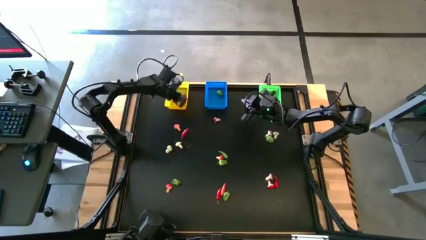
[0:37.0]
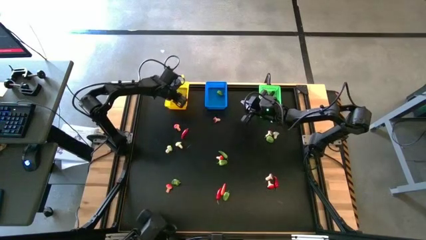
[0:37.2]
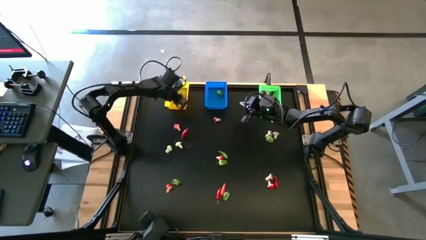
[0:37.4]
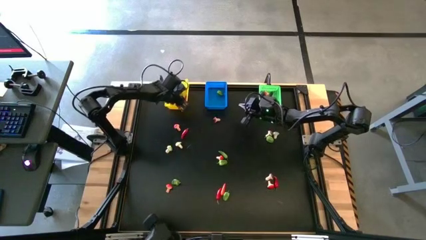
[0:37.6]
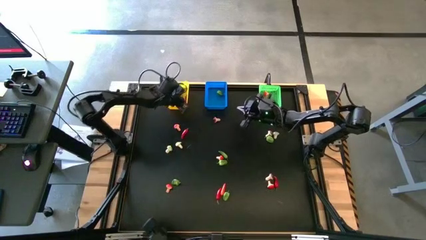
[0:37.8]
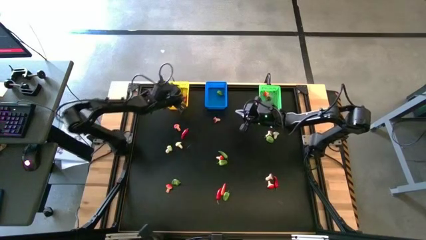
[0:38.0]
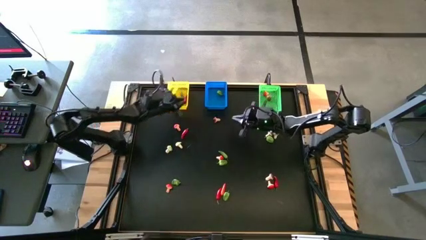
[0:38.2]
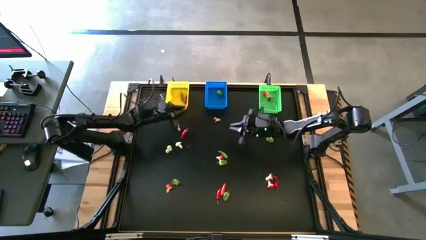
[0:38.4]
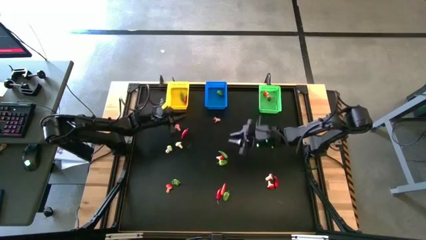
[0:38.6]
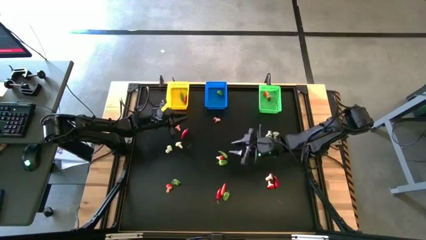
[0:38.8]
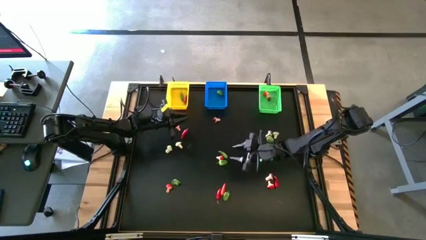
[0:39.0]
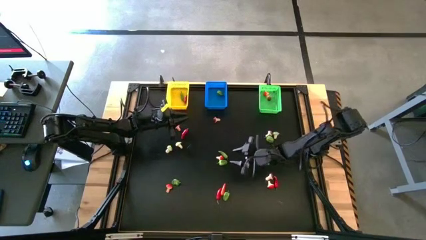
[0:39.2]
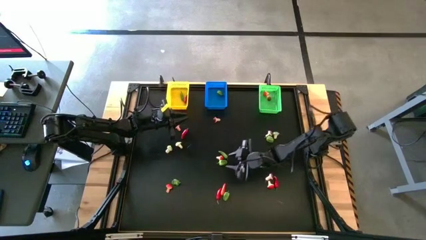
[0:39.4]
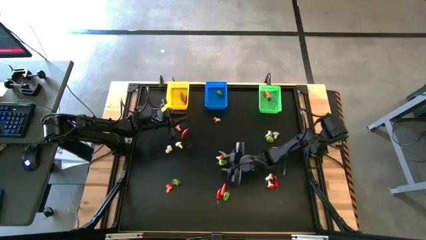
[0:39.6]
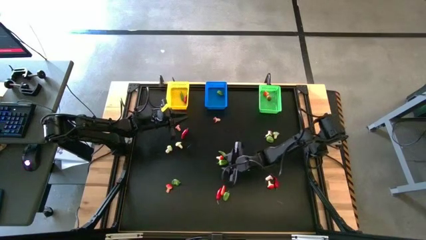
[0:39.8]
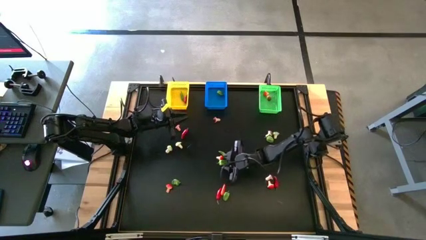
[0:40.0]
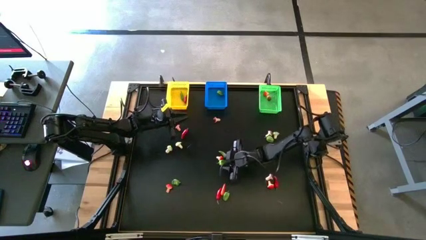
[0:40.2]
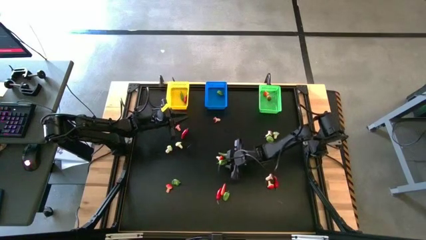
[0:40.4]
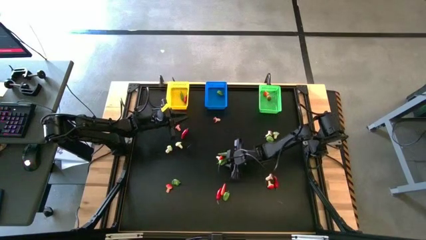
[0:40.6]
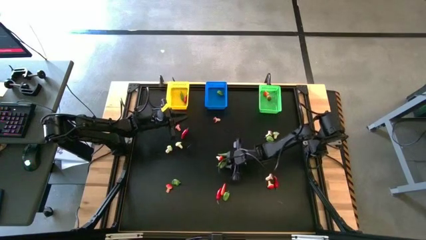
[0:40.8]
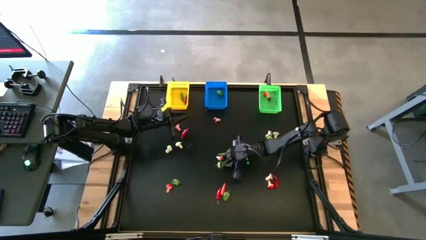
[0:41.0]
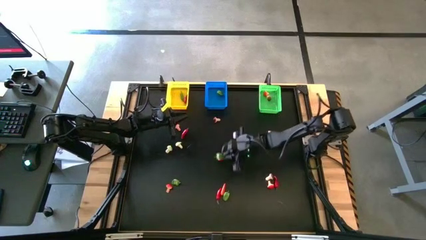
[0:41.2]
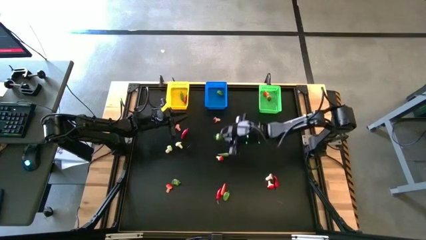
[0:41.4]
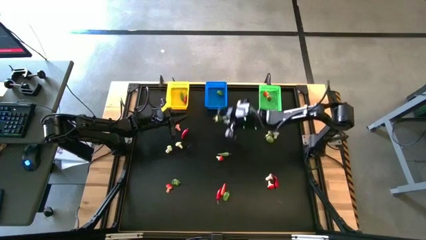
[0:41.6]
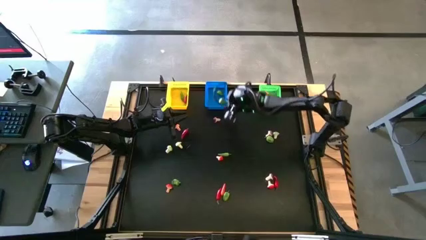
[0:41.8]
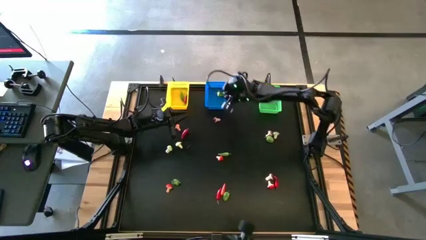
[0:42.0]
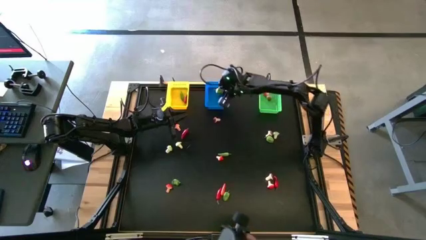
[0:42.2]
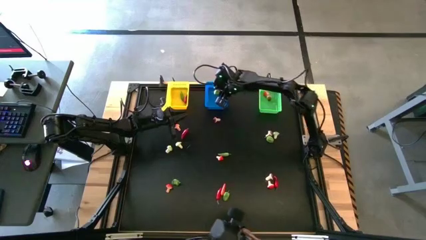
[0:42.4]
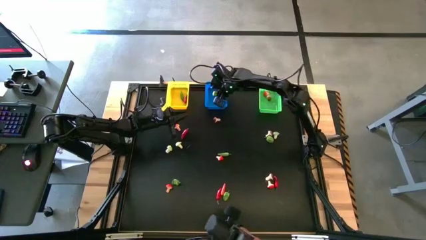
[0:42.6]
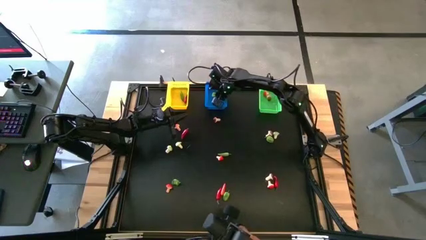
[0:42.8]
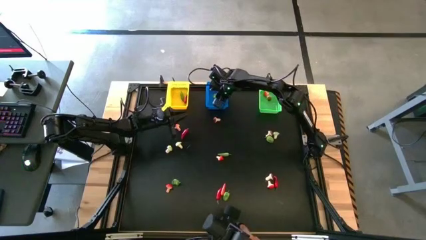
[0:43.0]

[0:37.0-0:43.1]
Task: Sort produce into baskets
Put the green chili pepper into the blue bin

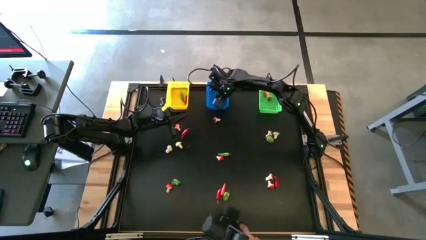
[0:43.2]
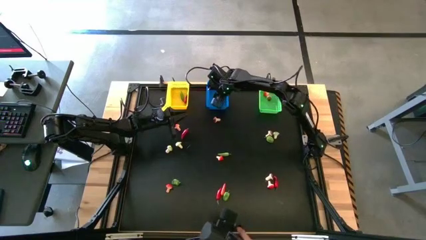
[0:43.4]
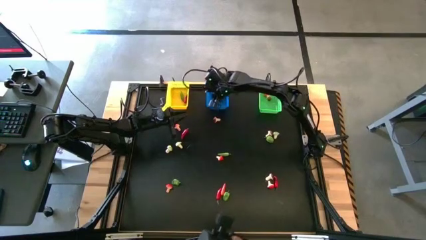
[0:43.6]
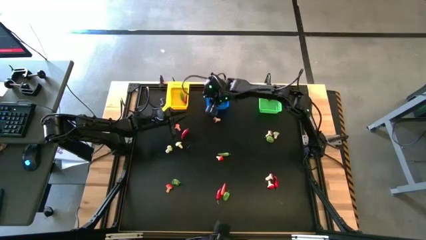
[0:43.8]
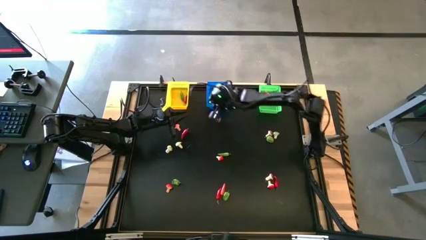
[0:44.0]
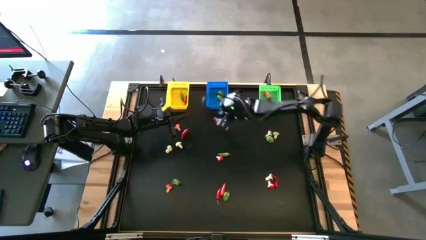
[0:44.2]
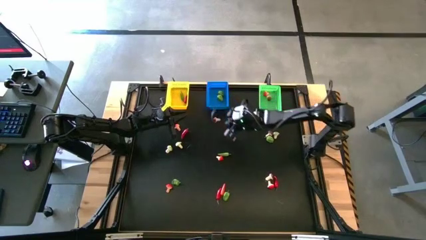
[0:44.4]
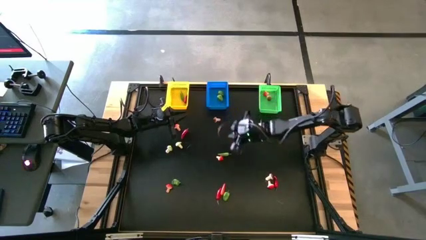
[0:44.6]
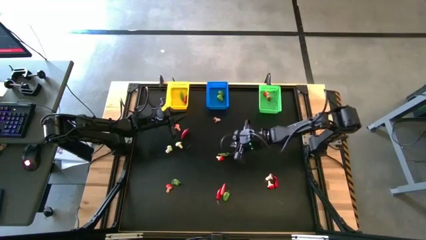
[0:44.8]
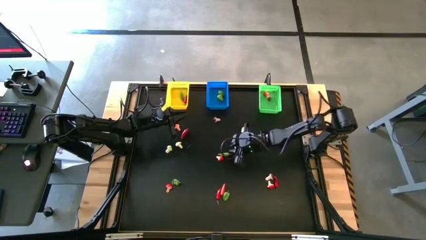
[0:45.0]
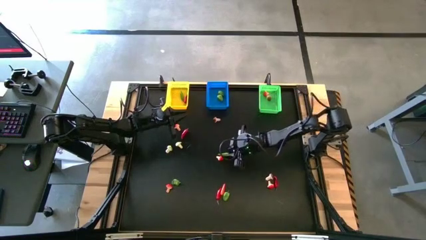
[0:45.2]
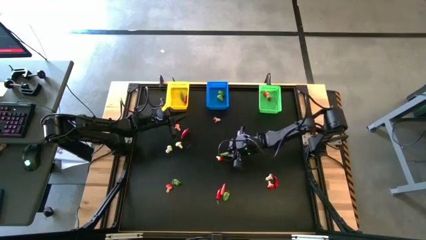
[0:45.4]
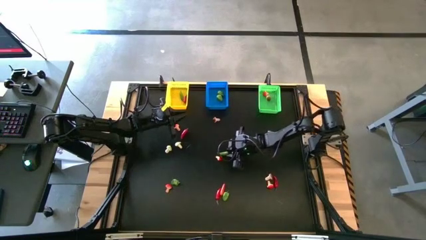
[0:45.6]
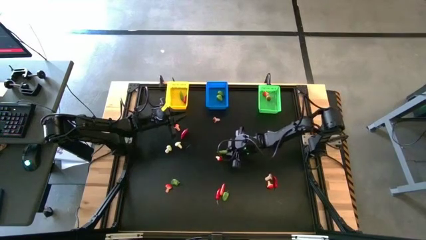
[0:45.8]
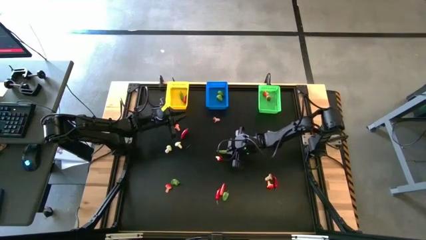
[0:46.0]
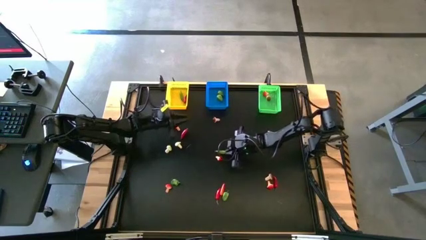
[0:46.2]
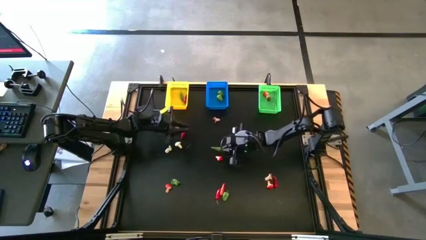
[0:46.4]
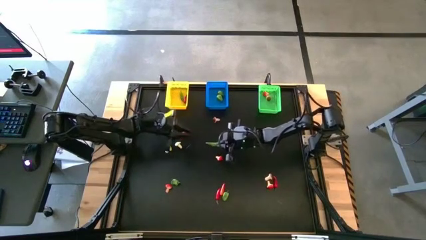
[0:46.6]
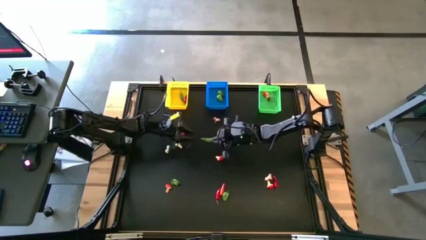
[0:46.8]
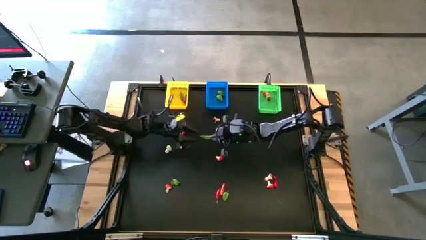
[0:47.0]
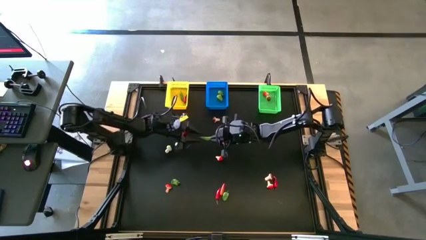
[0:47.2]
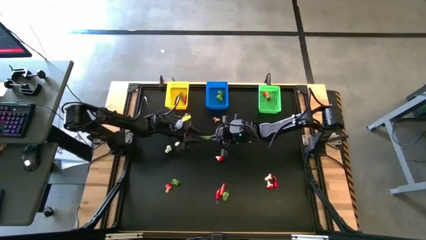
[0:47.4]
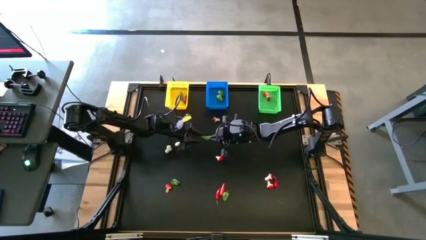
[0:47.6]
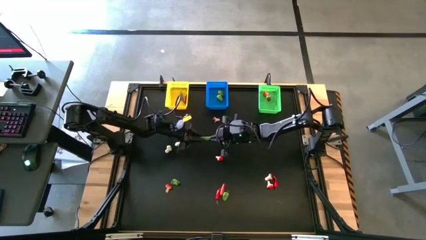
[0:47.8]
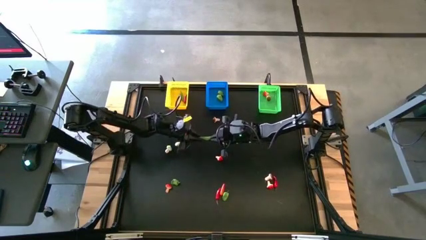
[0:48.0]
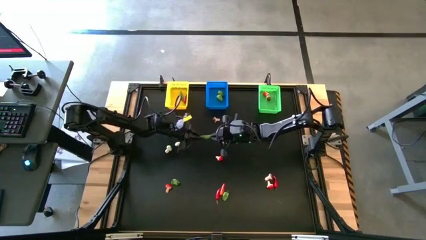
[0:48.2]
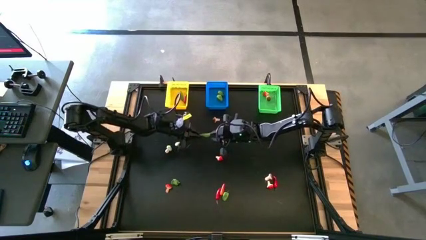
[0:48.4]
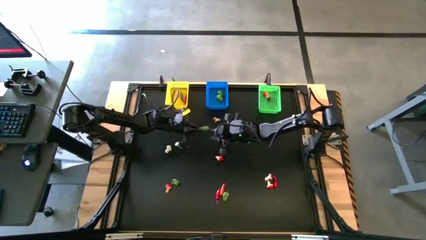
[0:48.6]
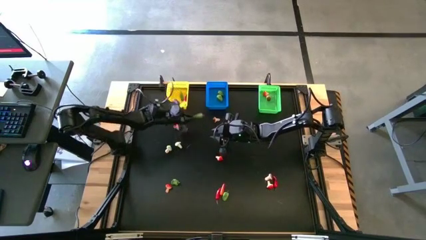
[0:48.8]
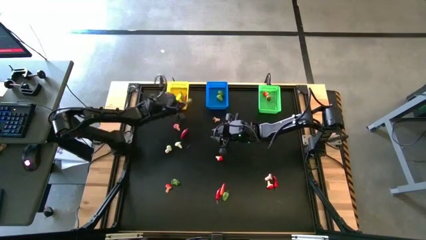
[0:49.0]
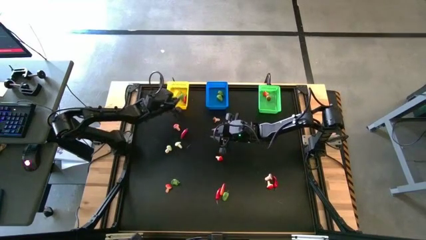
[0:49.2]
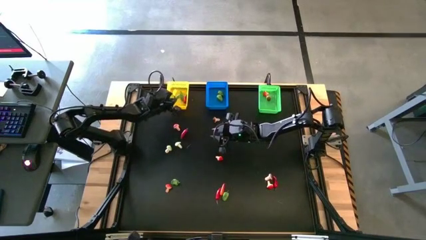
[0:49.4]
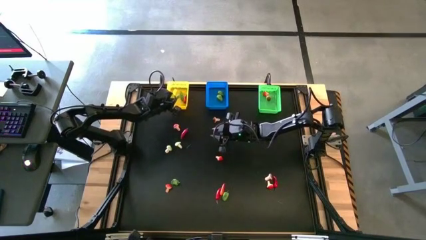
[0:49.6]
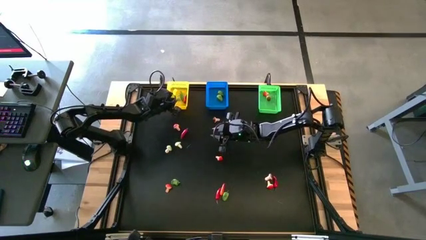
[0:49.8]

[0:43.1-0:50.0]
Put the green chili pepper into the yellow bin

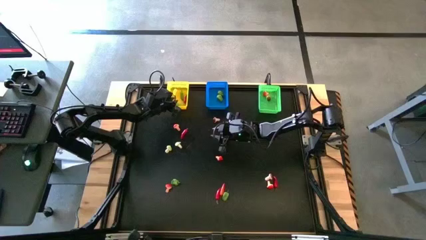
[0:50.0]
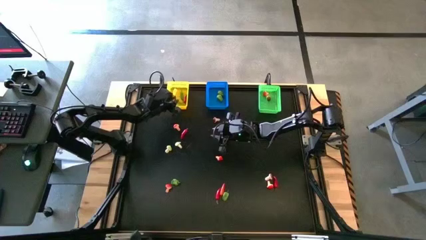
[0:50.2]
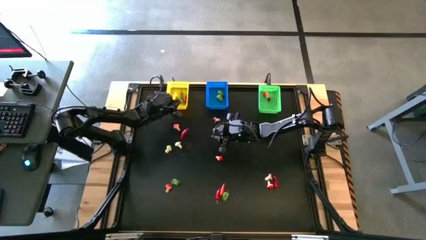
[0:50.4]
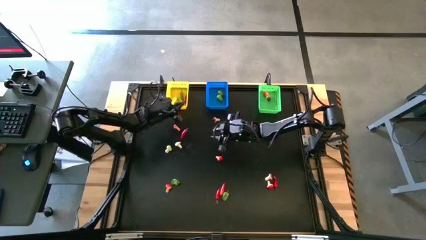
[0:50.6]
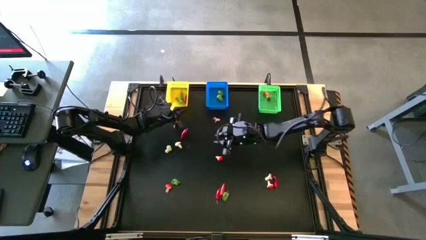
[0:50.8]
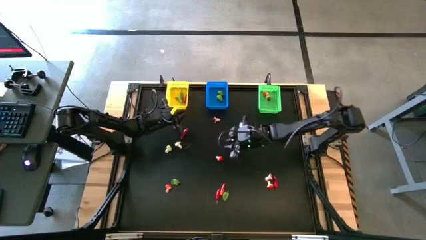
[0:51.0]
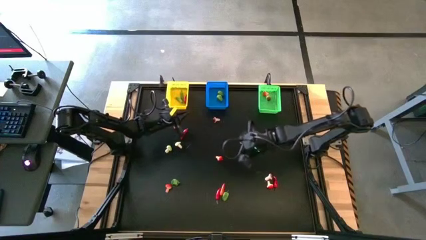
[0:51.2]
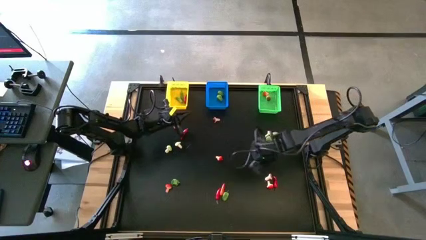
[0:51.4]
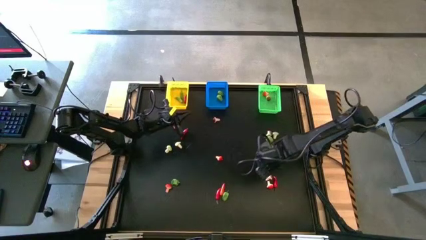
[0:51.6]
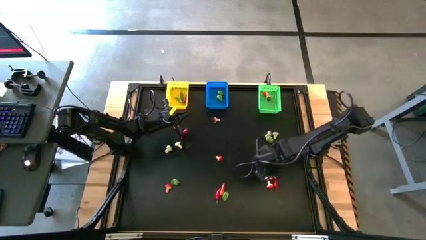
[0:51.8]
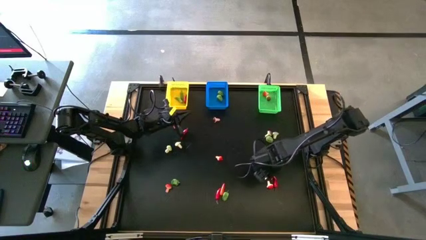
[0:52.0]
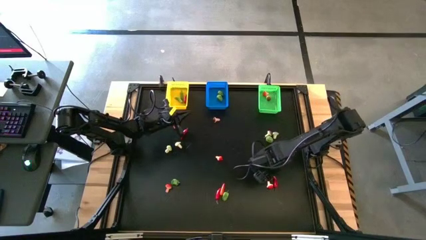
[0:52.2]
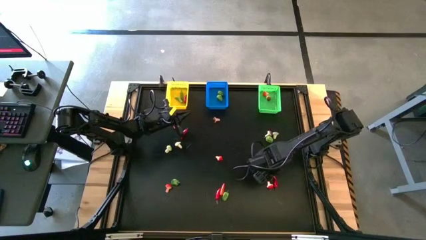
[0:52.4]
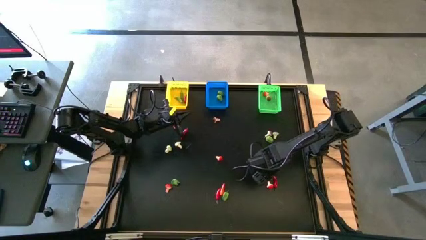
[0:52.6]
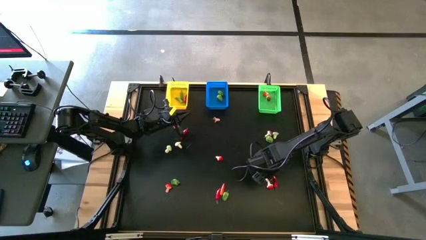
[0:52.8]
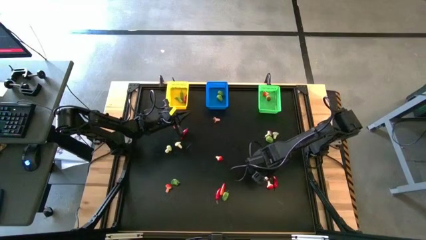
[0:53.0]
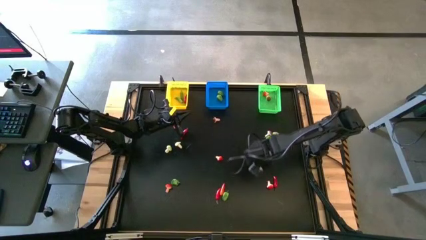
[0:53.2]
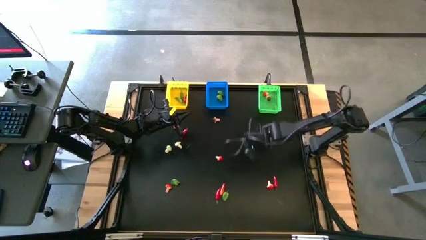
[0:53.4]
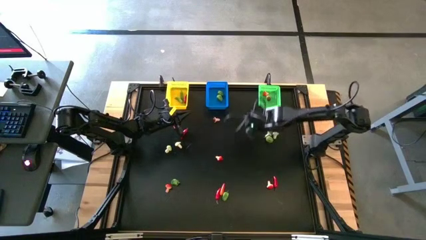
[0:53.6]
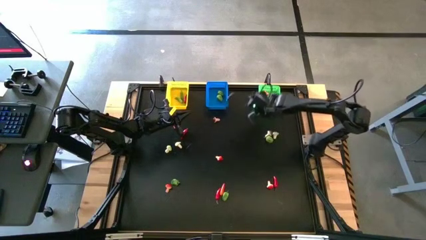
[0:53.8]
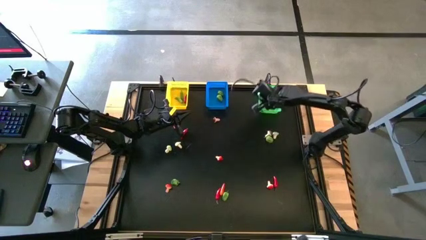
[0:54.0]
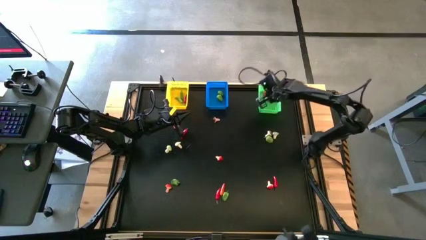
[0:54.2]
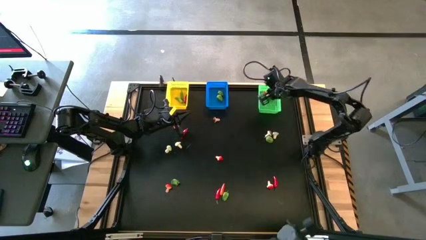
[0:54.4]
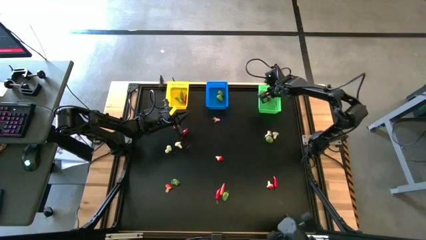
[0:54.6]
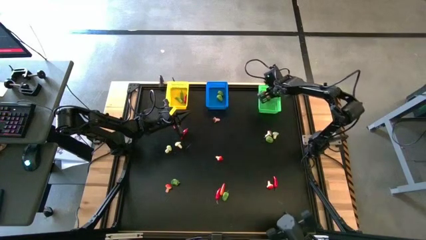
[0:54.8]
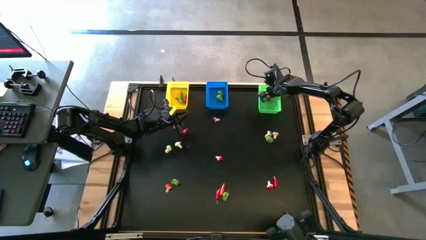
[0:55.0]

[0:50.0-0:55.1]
Put the brown mushroom into the green bin
